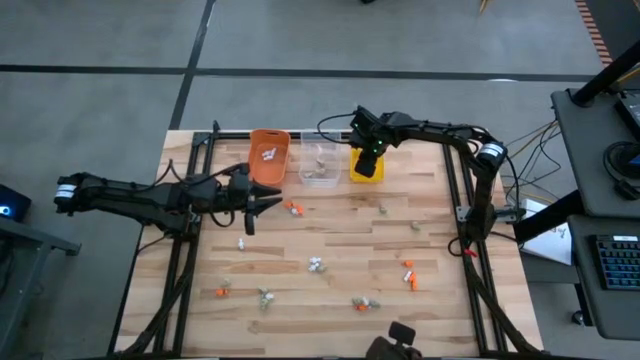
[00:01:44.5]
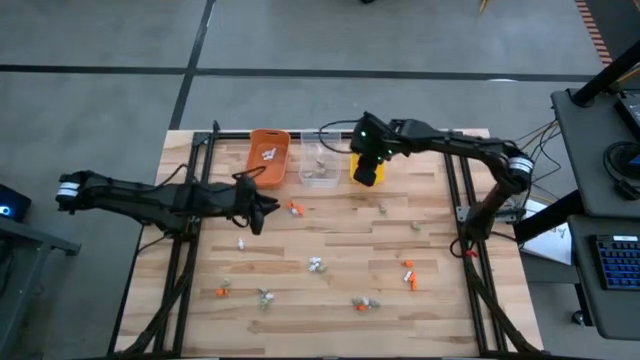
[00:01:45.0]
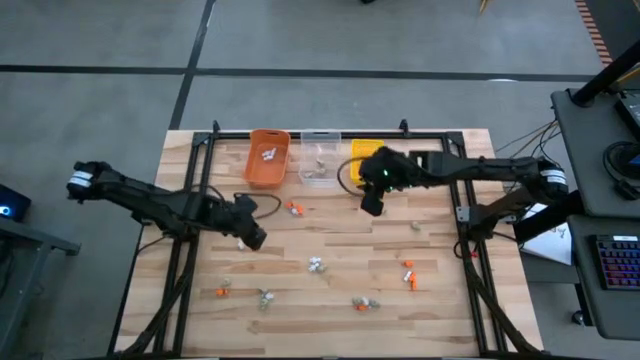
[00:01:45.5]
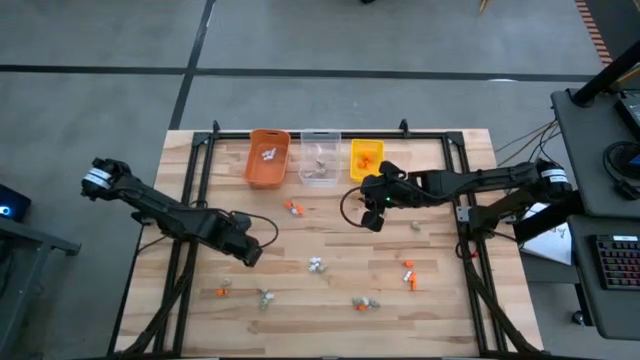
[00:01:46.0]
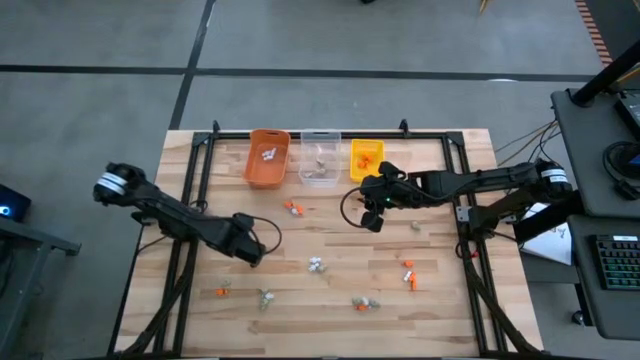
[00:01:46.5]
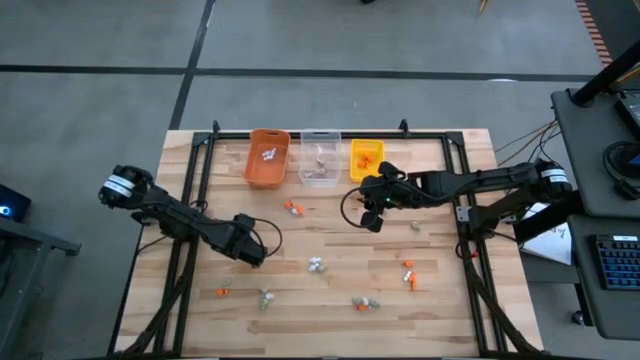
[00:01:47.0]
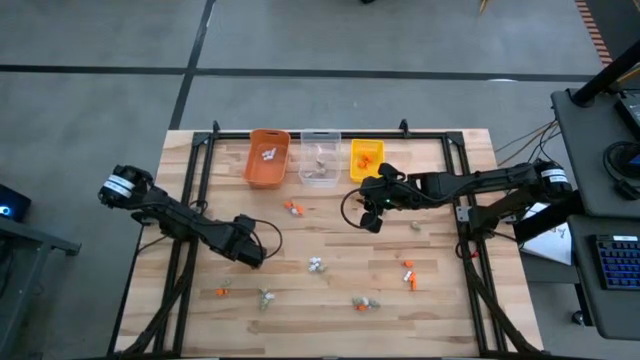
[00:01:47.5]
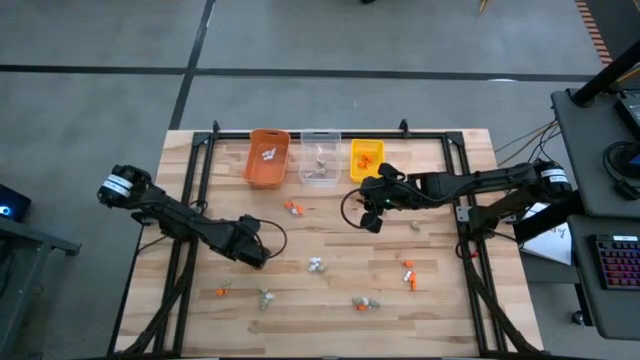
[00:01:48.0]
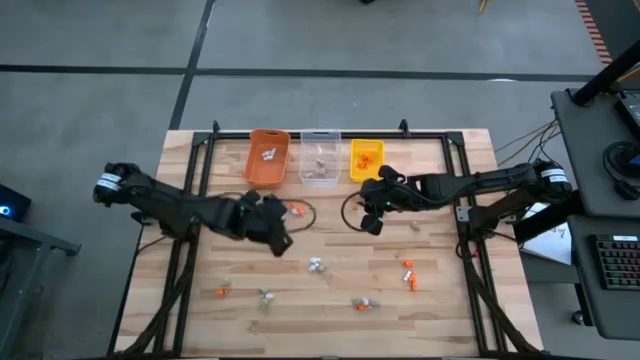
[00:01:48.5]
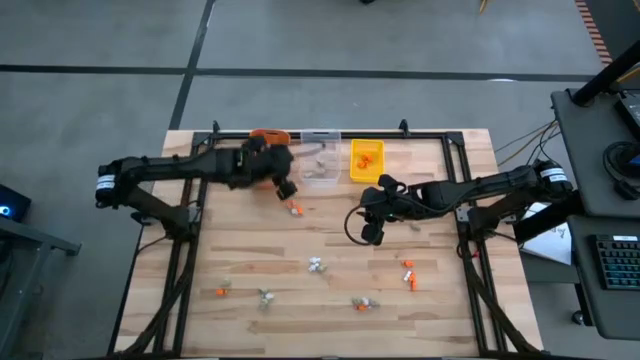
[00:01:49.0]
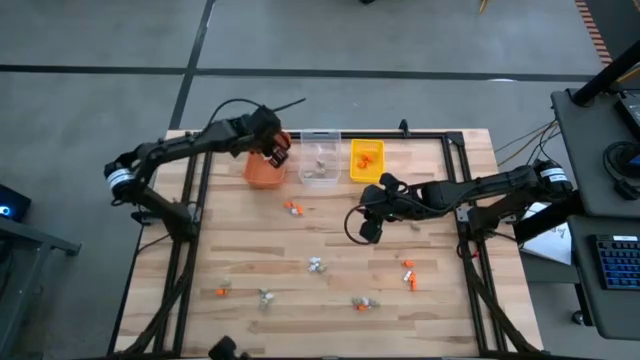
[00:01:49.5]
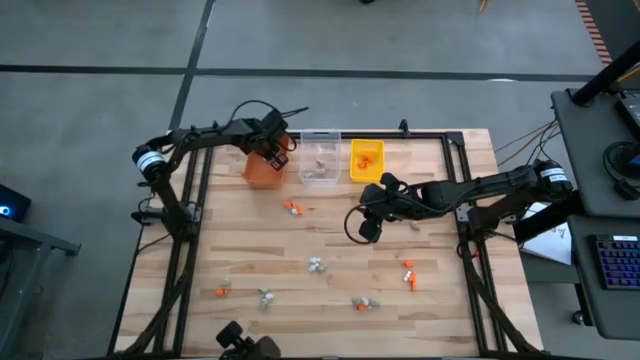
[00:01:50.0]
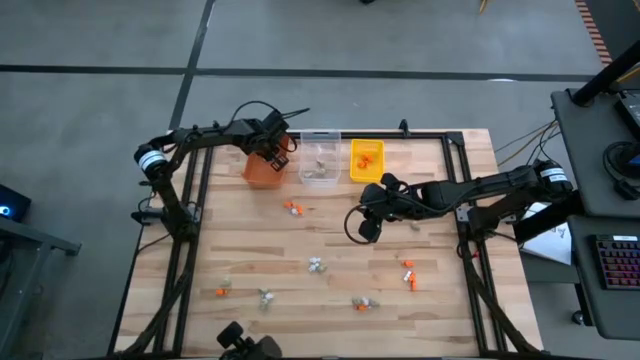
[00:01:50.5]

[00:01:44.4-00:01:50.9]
Task: Sort Halloween decoration
Put the white skeleton toy into the orange bin

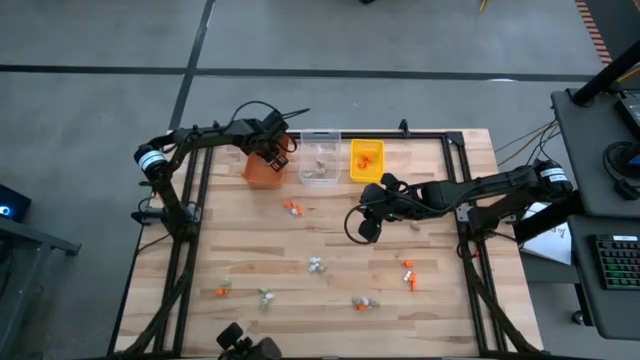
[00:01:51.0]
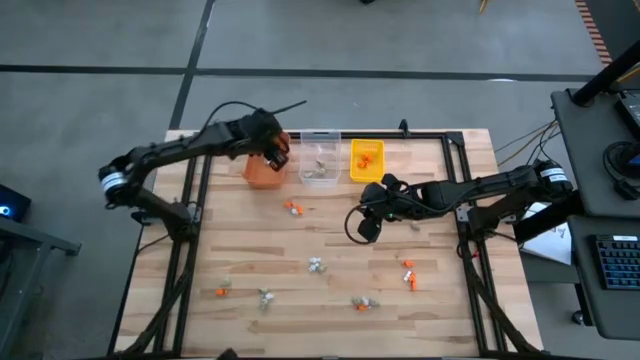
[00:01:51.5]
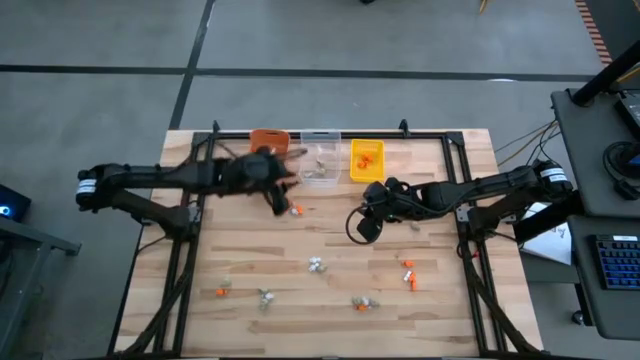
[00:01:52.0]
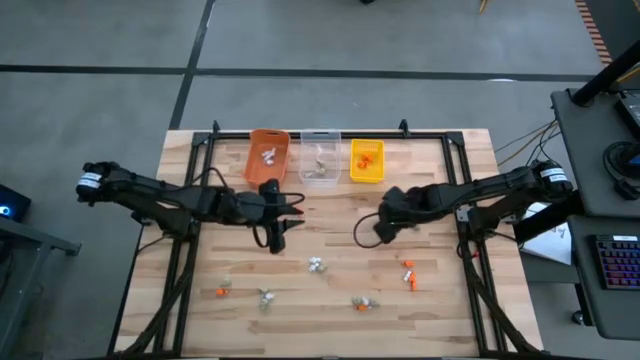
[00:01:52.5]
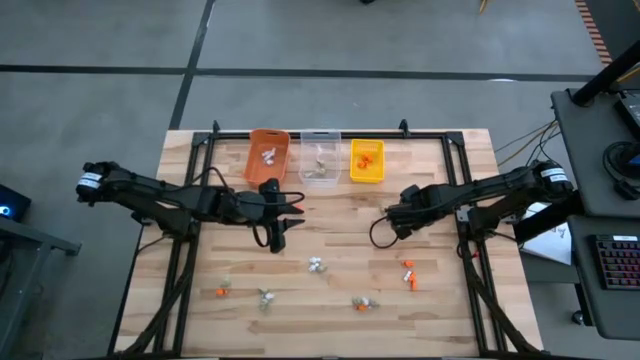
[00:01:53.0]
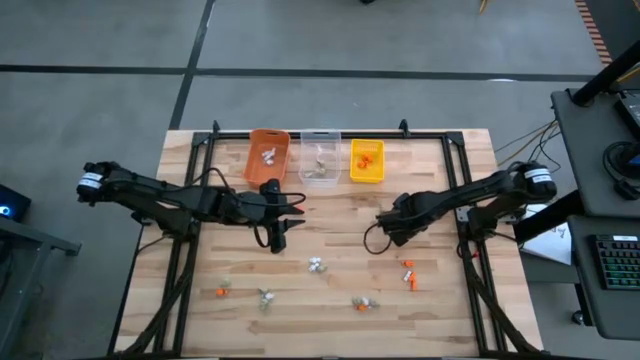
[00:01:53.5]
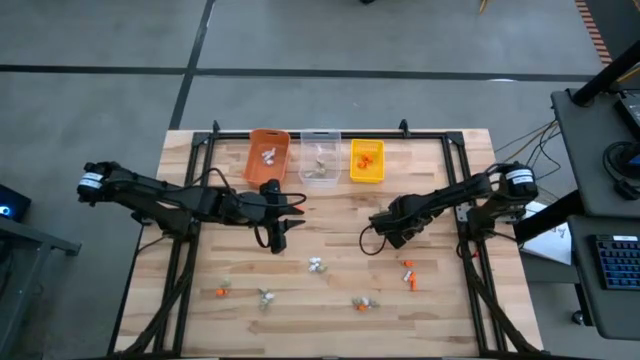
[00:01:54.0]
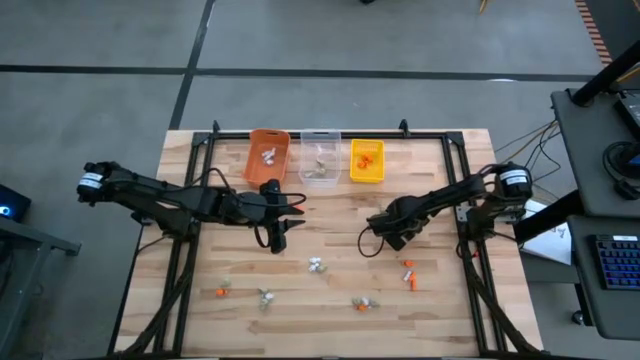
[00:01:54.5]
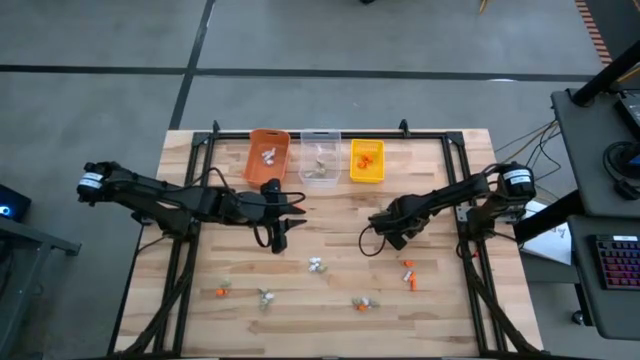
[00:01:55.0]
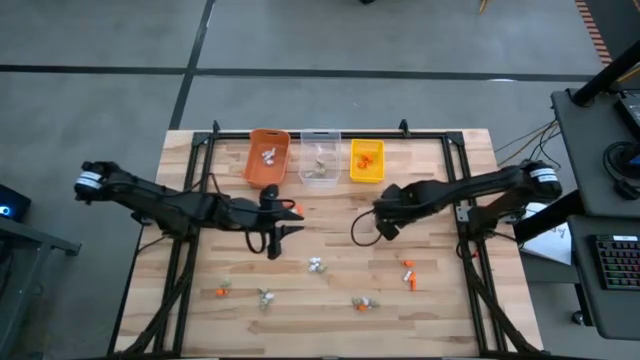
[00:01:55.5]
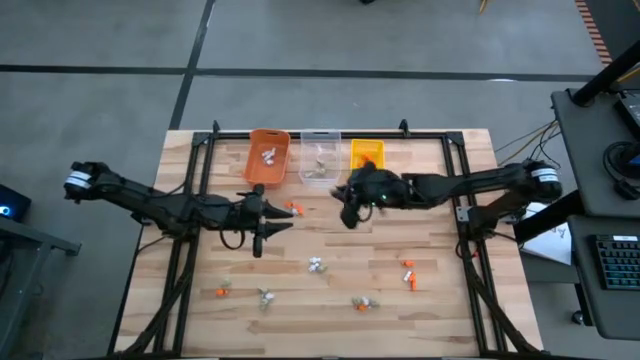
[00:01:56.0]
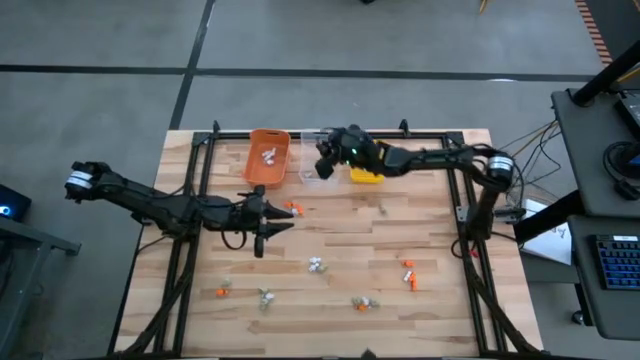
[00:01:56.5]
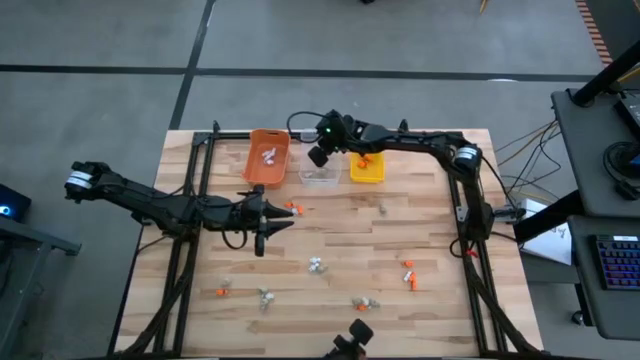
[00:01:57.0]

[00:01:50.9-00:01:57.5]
Put the gray skull toy into the transparent bin

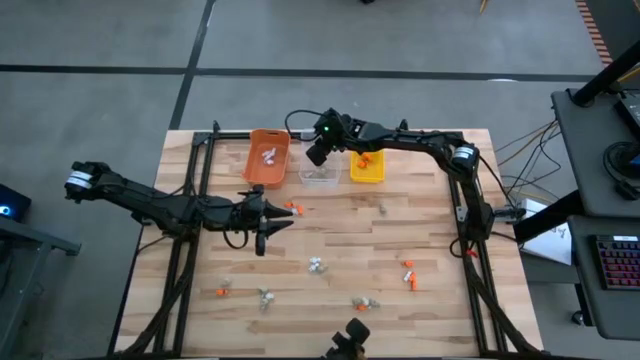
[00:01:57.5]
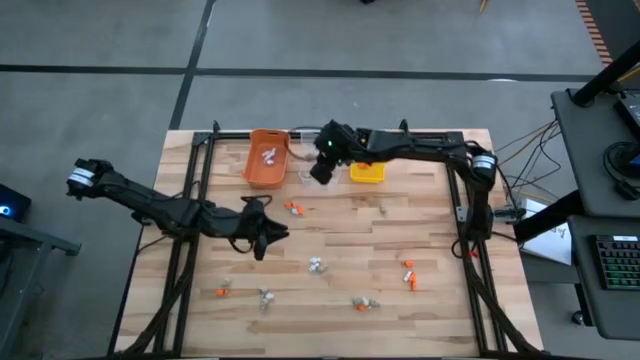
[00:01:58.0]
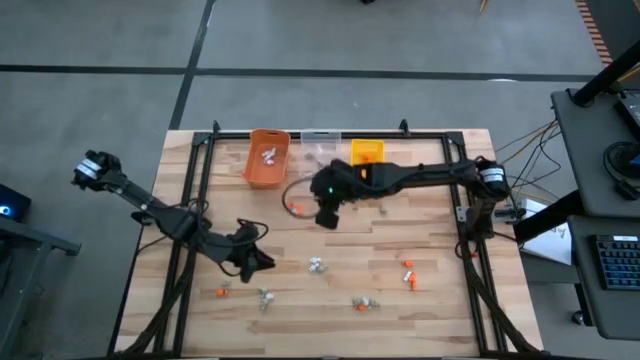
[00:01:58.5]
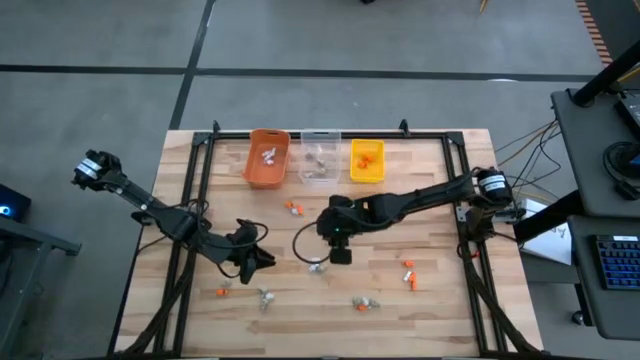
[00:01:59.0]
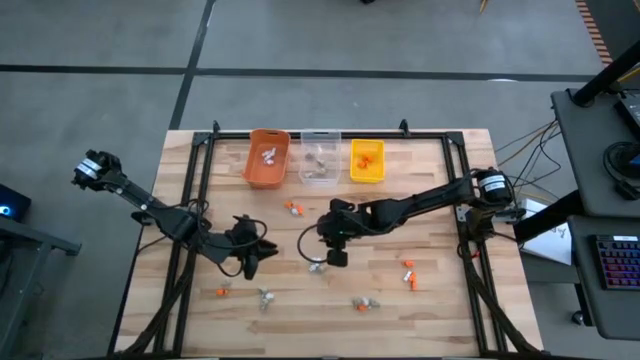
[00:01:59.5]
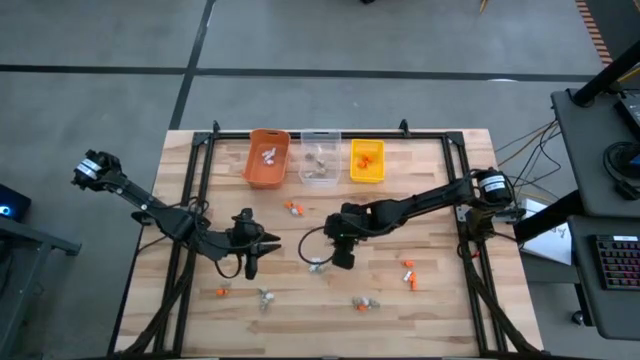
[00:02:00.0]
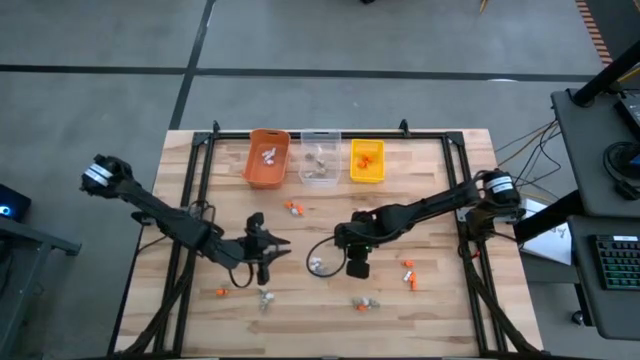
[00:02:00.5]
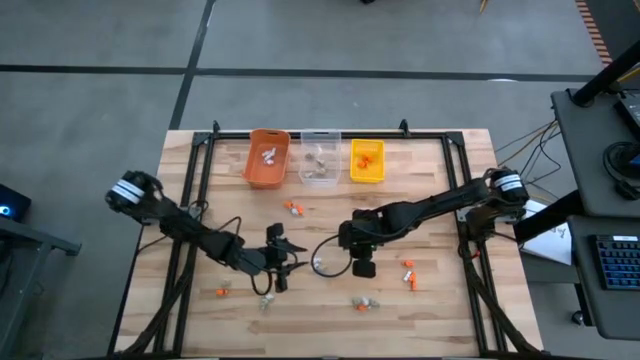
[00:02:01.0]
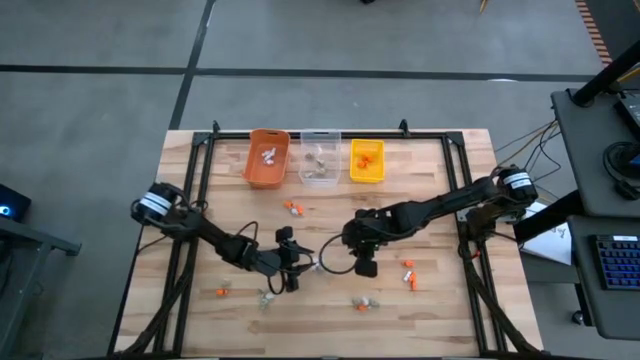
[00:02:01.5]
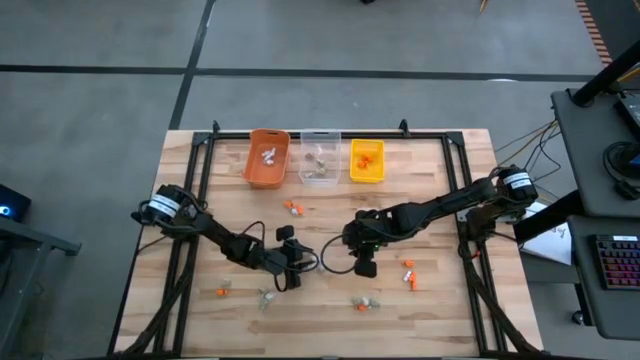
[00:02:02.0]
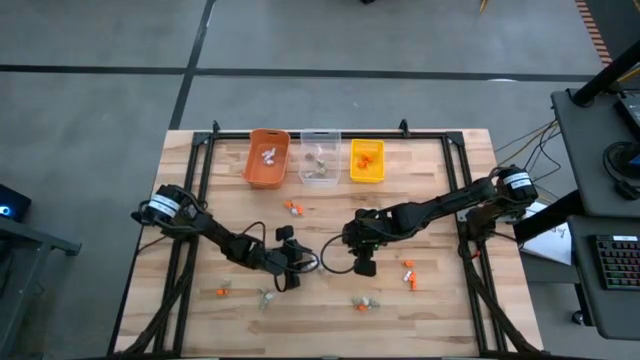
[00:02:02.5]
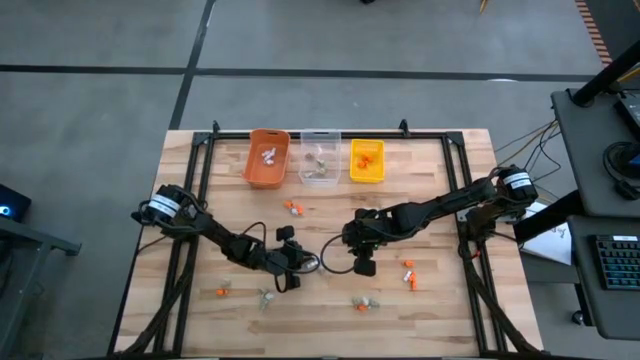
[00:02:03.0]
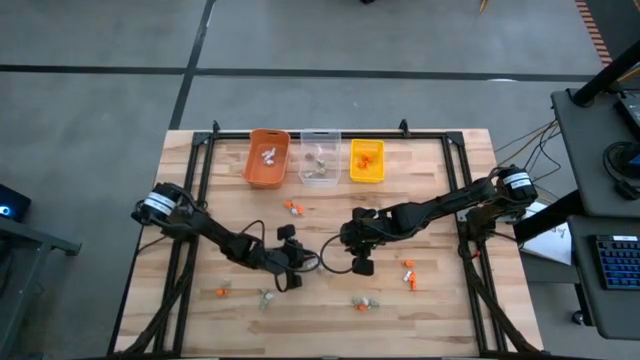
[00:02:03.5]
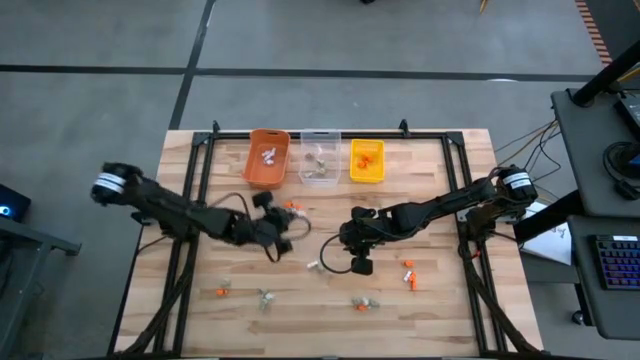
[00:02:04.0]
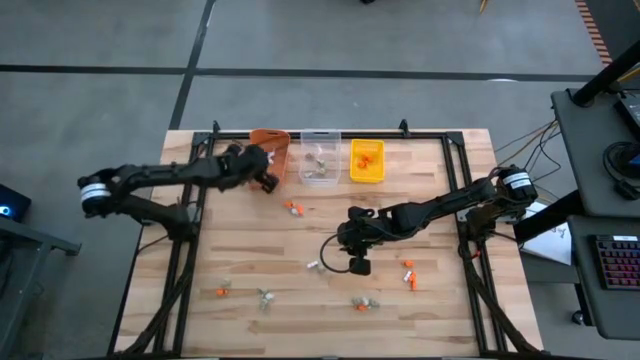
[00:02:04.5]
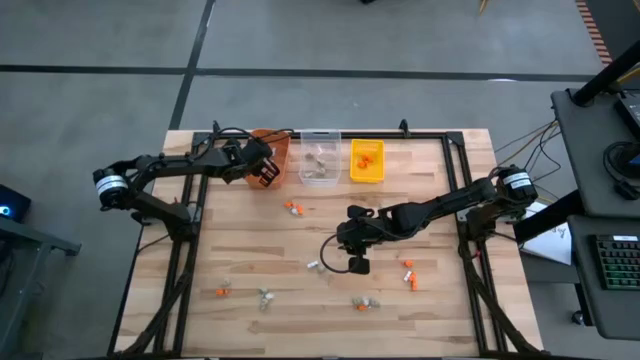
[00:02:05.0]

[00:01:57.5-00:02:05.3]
Put the white skeleton toy into the orange bin
